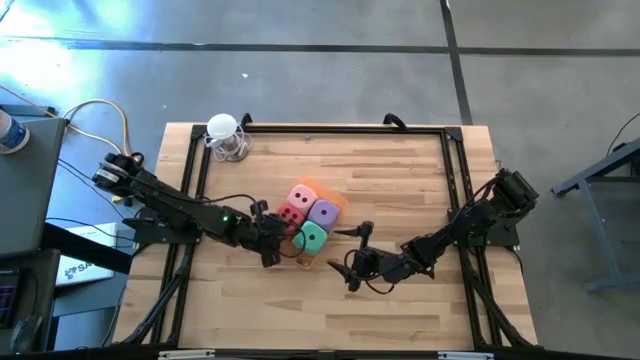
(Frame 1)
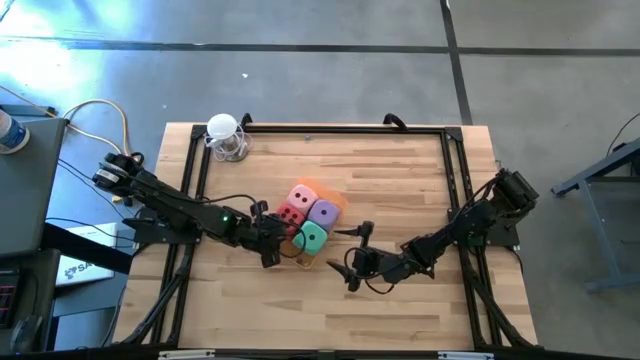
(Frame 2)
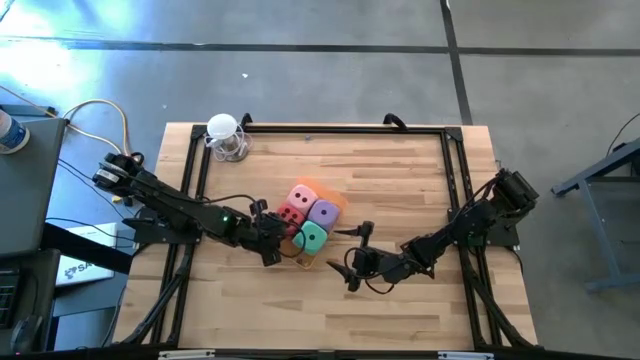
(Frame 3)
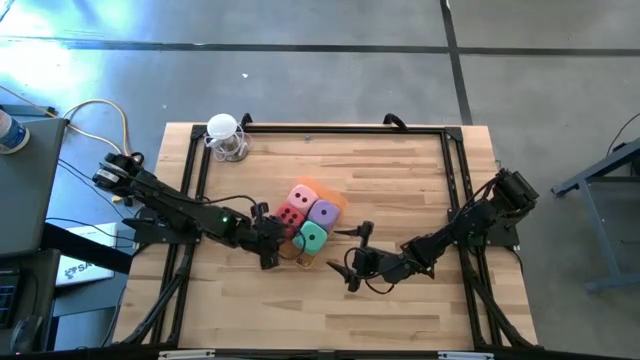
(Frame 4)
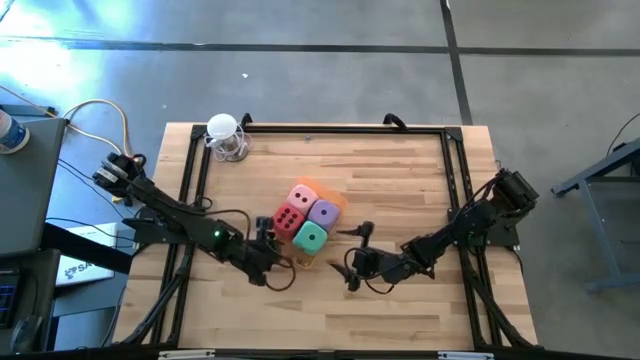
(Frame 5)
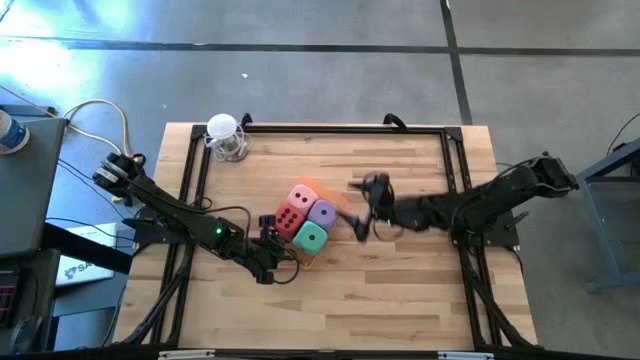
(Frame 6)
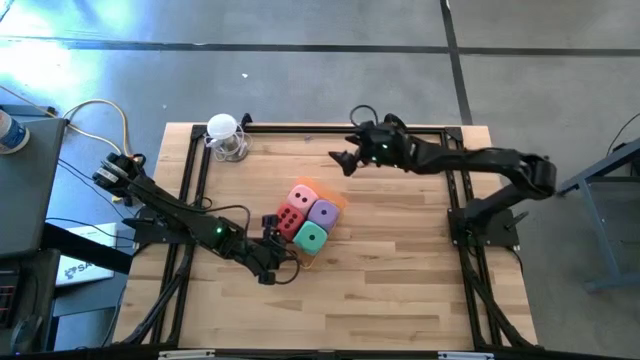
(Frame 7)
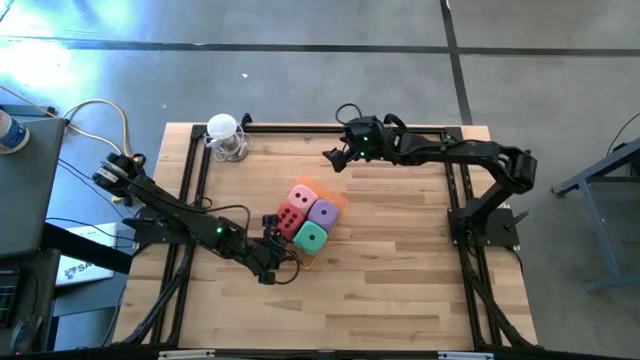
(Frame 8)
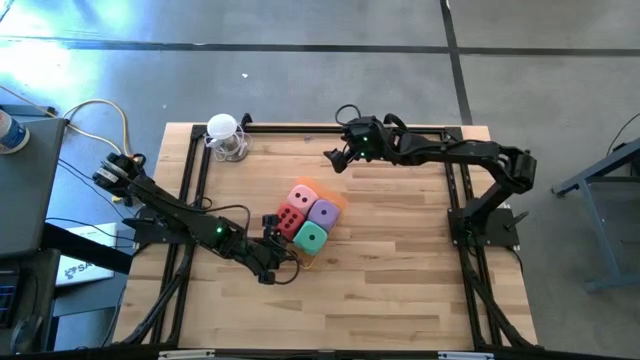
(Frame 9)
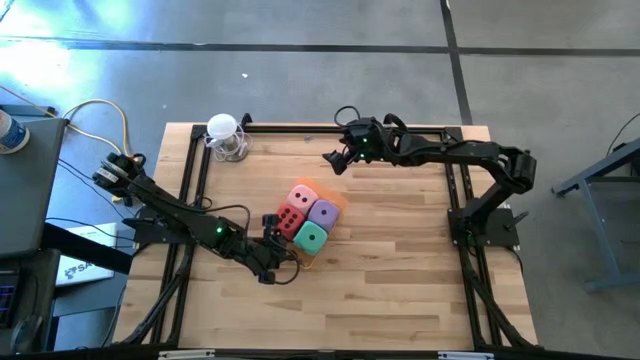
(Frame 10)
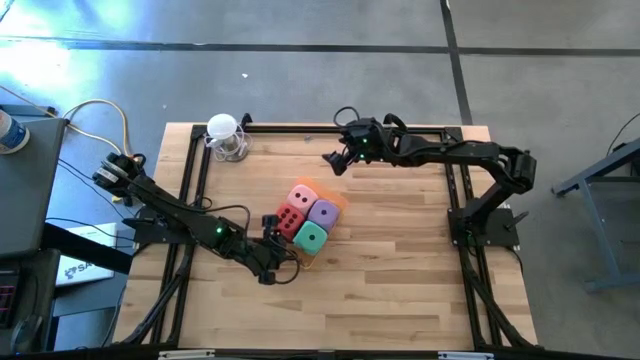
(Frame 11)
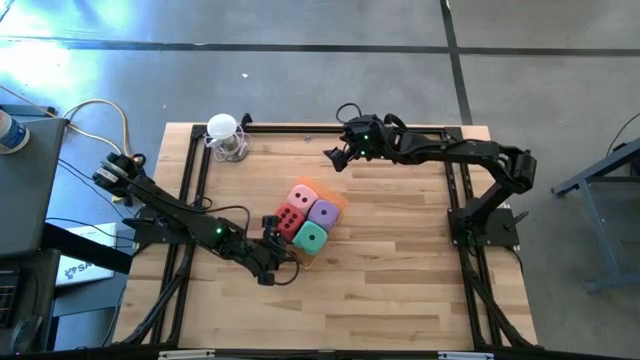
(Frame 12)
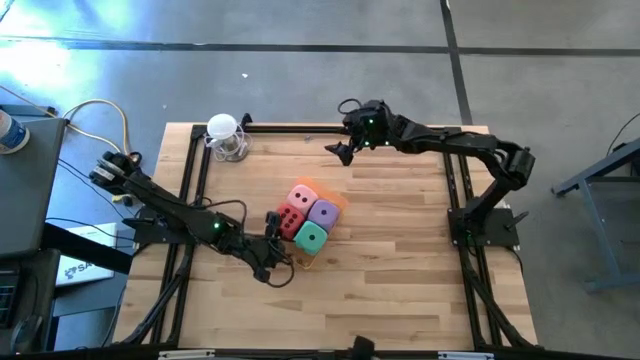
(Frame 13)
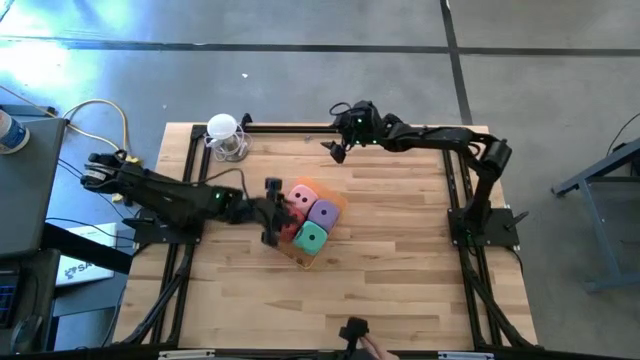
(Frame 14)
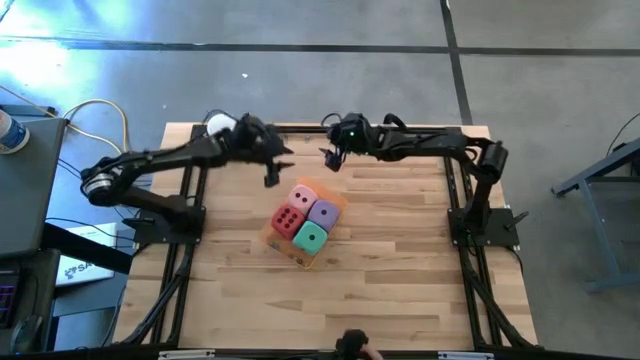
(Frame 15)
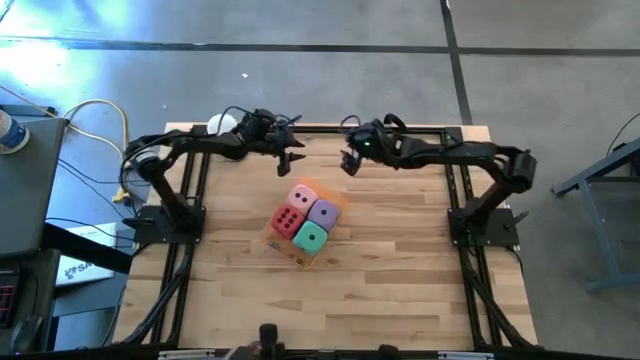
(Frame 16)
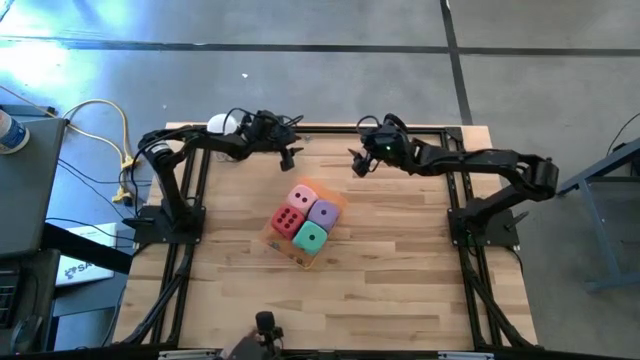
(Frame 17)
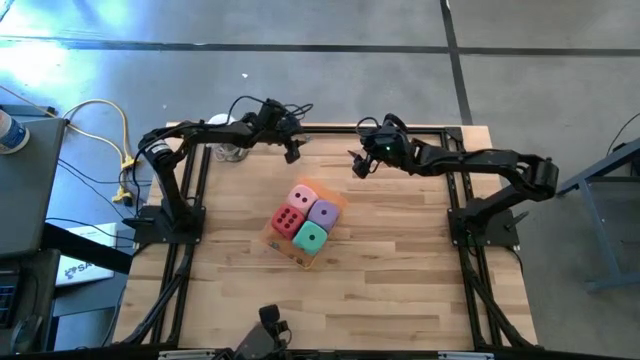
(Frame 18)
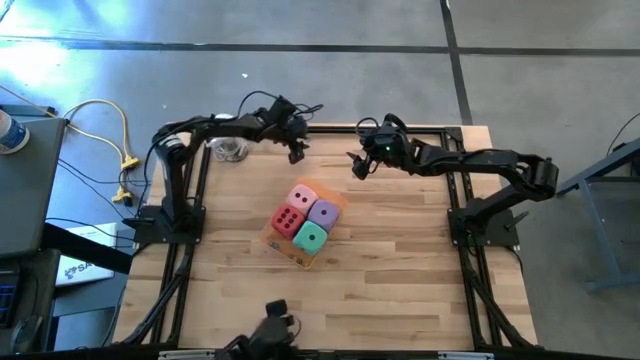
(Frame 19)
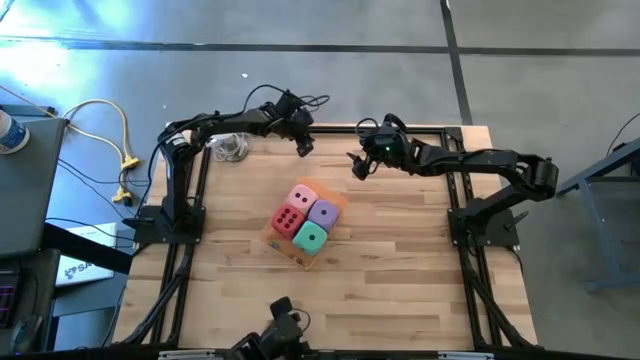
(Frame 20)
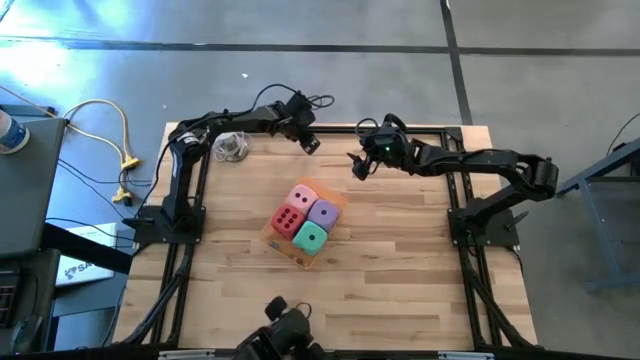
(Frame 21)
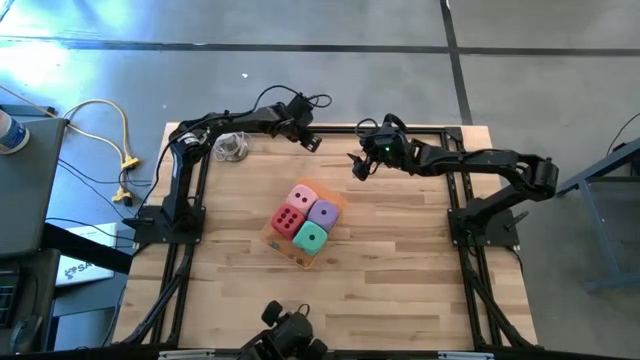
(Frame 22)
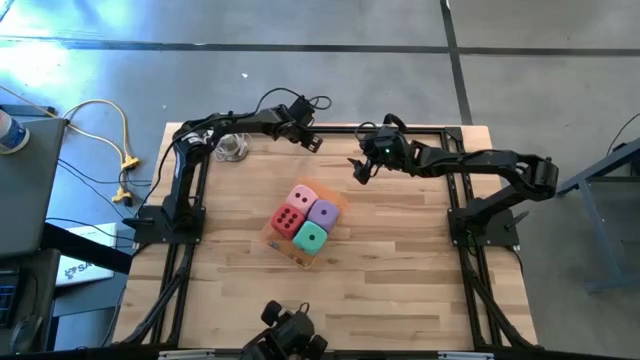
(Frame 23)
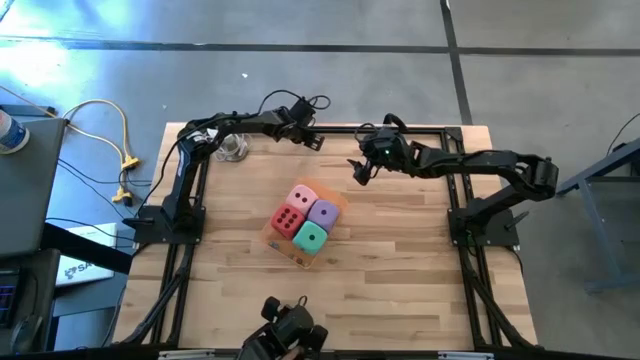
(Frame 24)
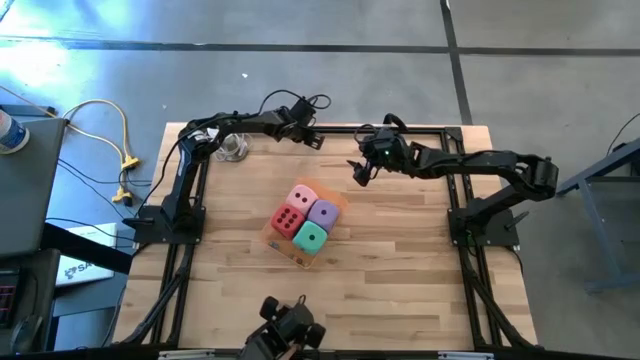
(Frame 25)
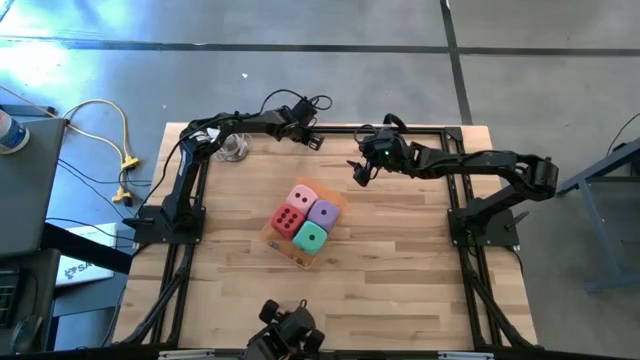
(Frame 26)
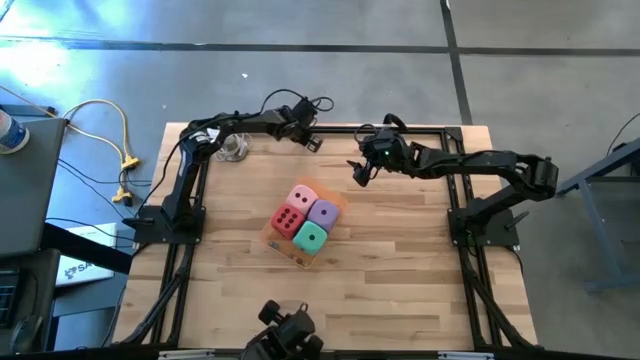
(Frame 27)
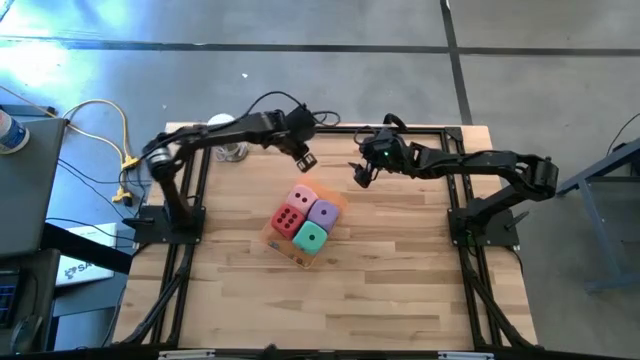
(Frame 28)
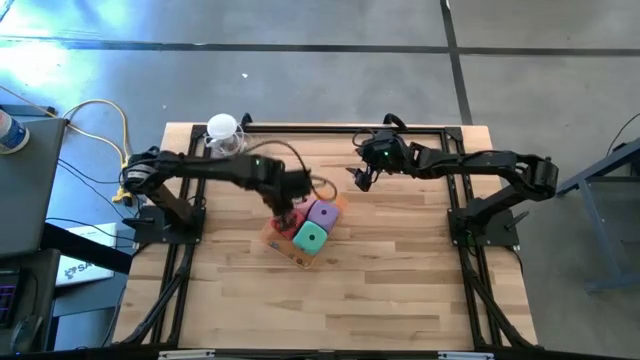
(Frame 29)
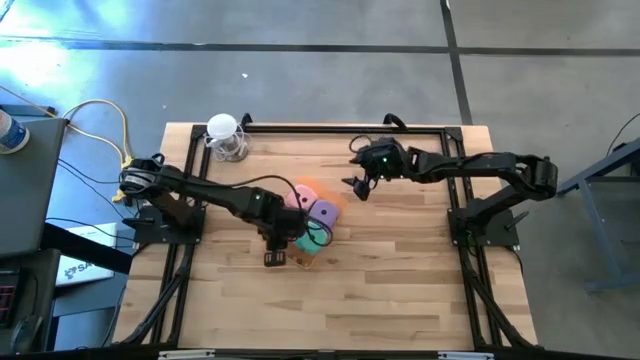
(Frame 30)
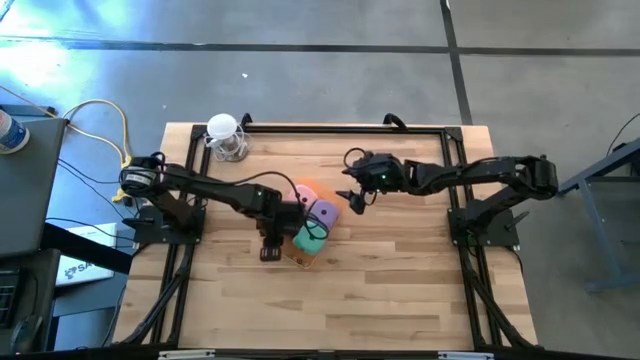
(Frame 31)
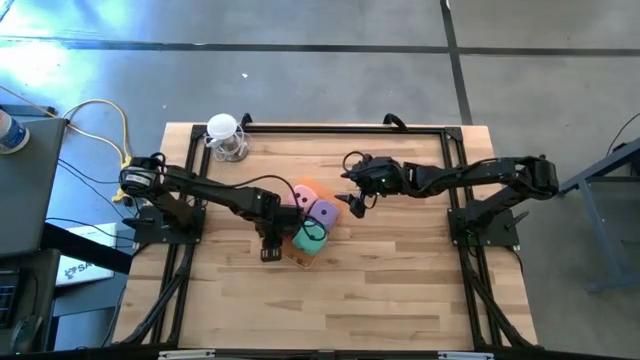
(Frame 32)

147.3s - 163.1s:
Task: Pick & Place Dice
Put the small light blue die into the orange bin

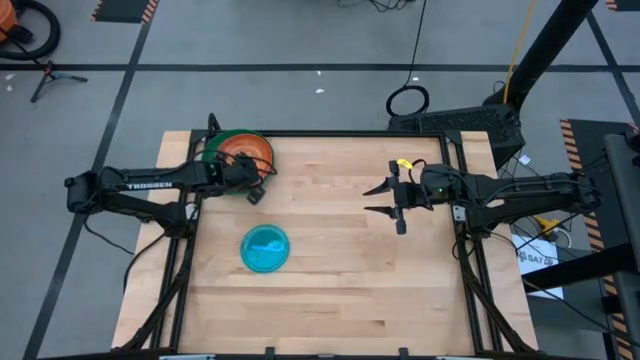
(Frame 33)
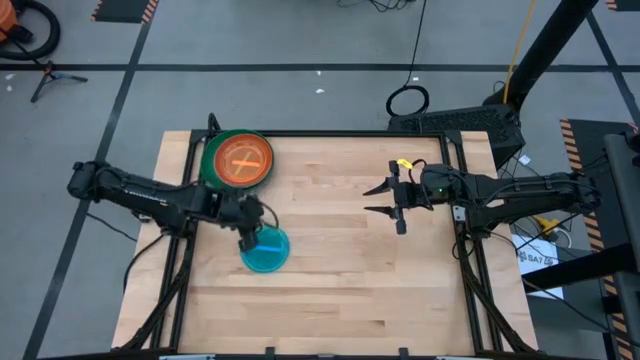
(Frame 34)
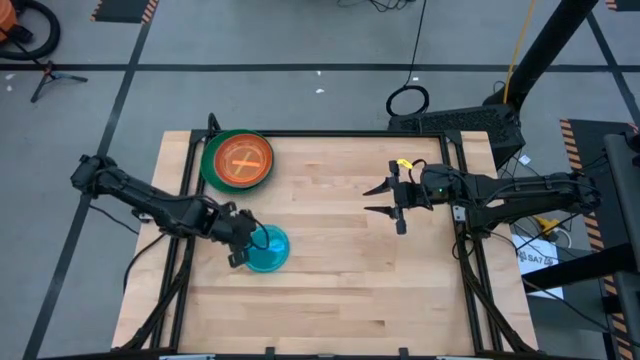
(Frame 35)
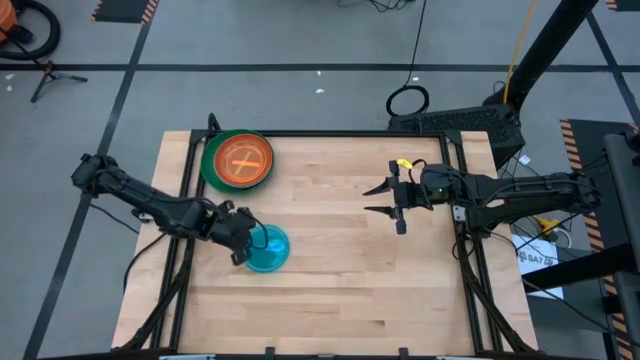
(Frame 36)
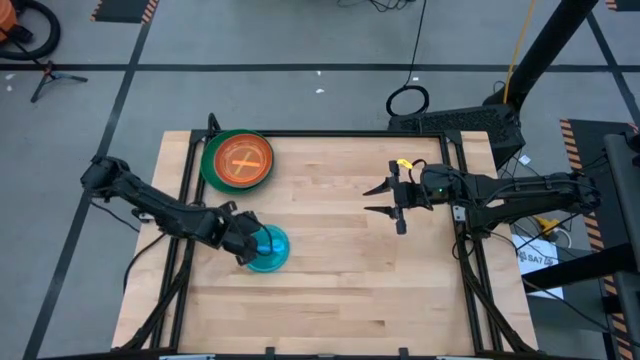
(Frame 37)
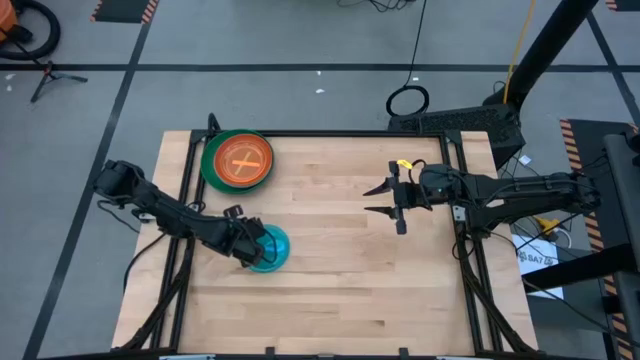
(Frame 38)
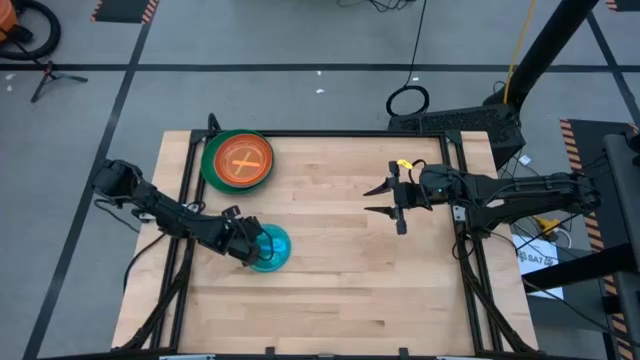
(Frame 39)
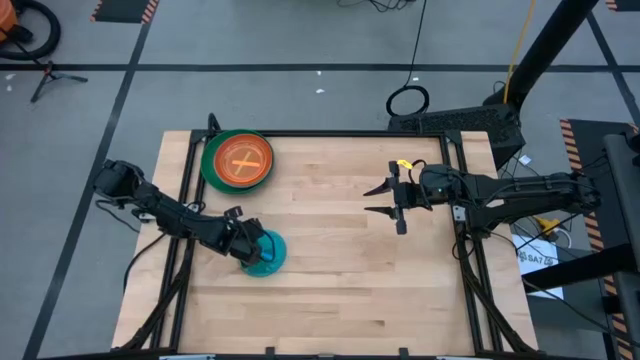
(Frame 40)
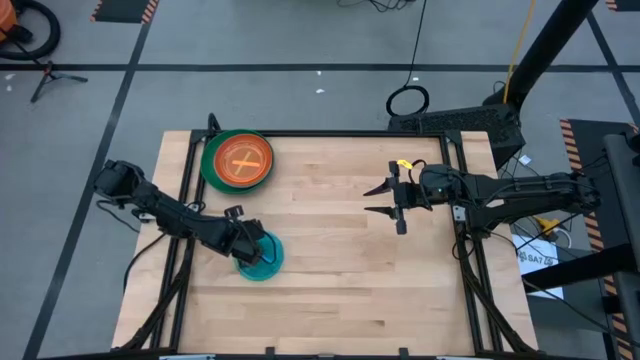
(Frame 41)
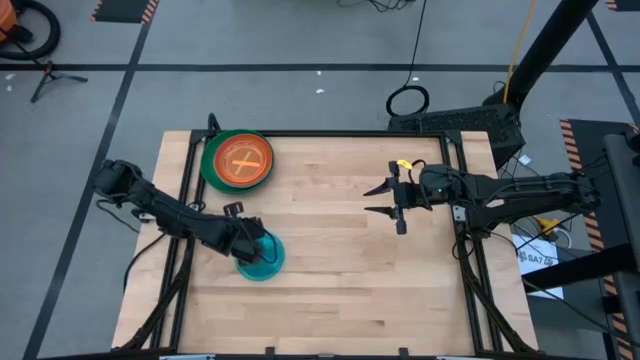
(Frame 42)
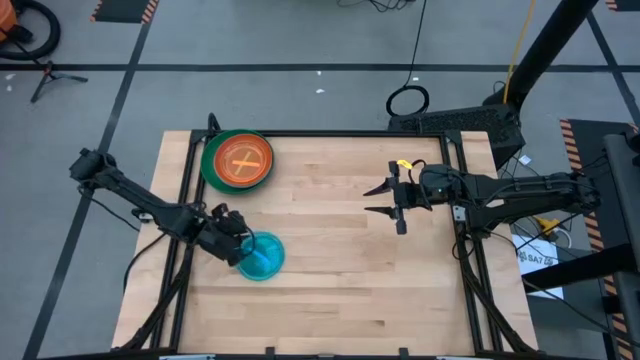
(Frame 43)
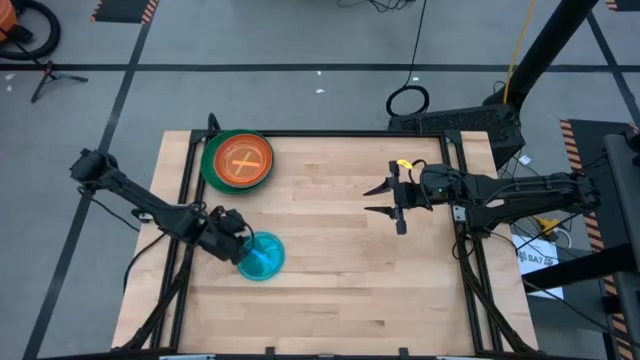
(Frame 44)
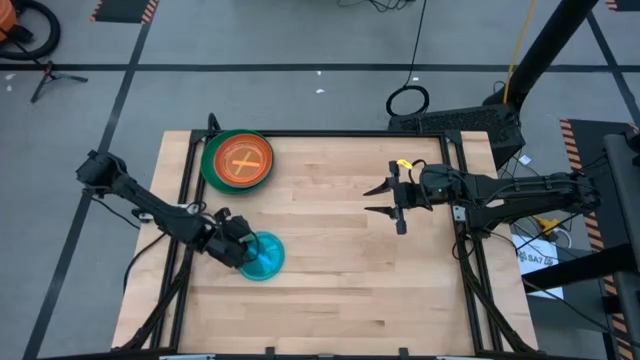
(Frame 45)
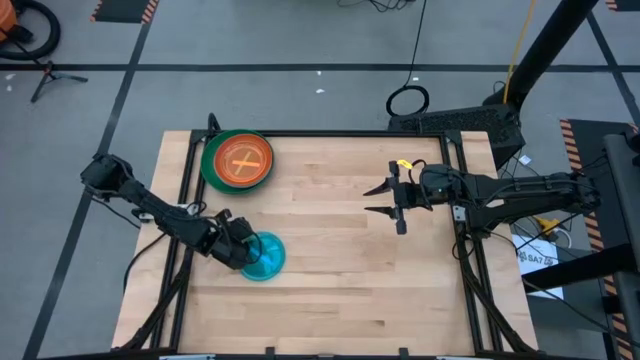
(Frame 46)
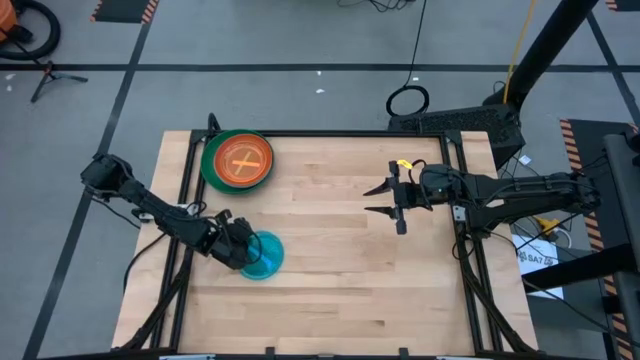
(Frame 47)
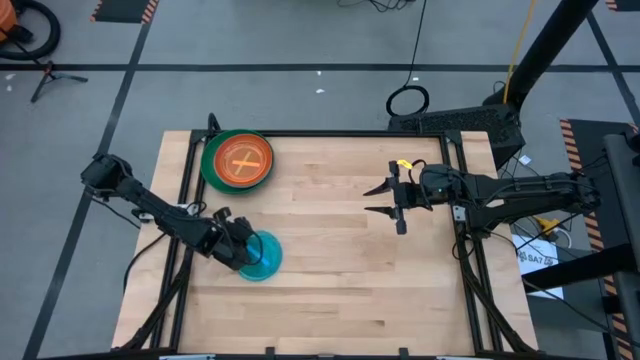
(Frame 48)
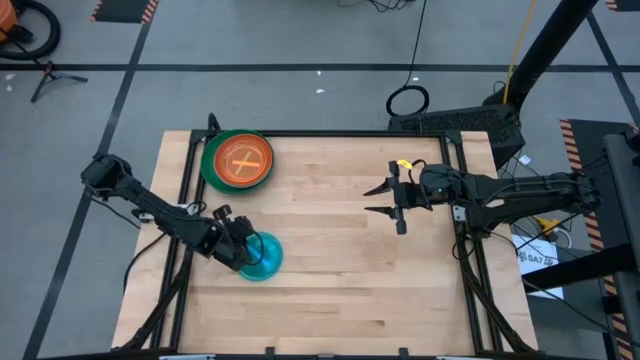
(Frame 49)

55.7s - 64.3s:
Task: Stack plastic plates
Stack the blue plate on top of the orange plate
